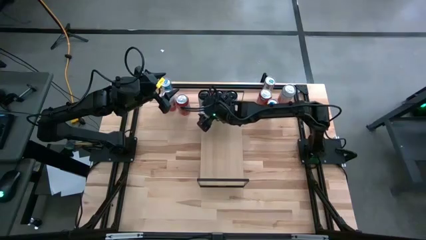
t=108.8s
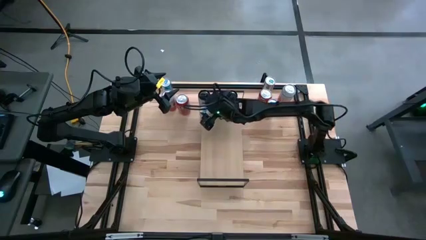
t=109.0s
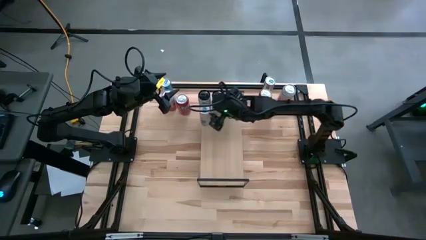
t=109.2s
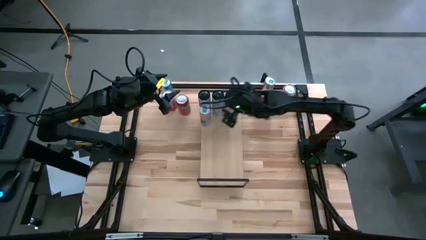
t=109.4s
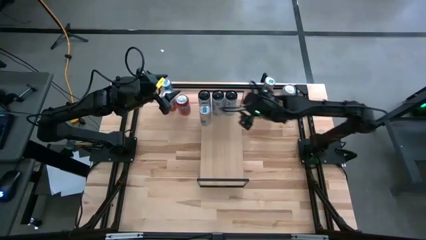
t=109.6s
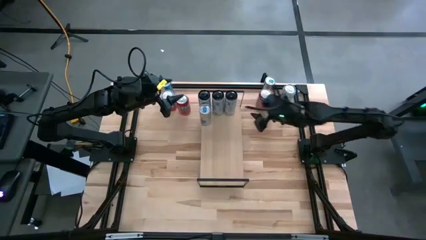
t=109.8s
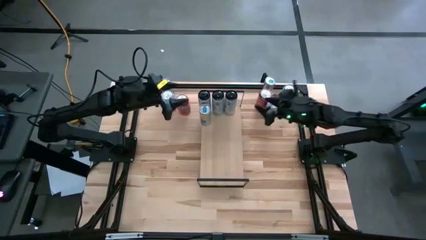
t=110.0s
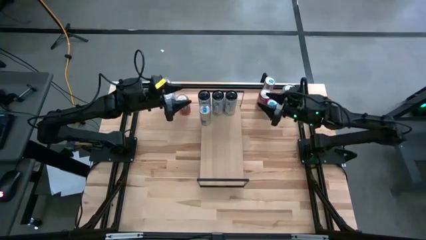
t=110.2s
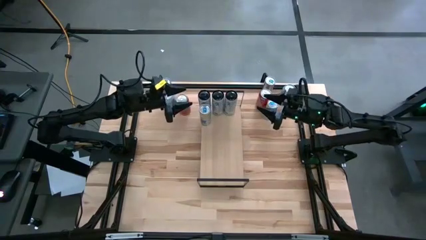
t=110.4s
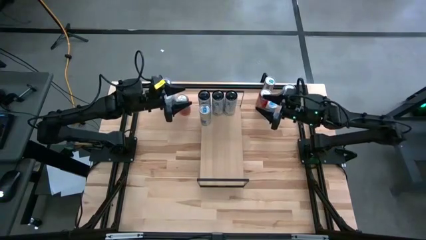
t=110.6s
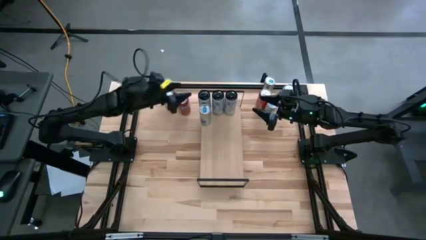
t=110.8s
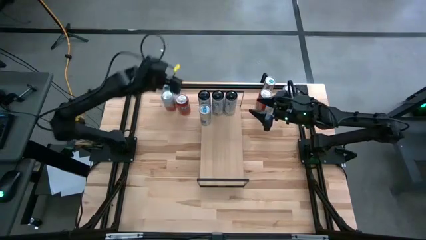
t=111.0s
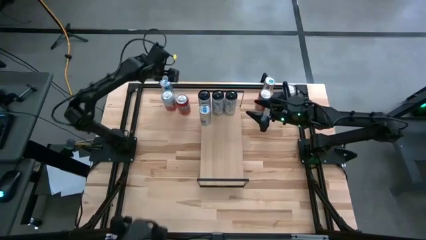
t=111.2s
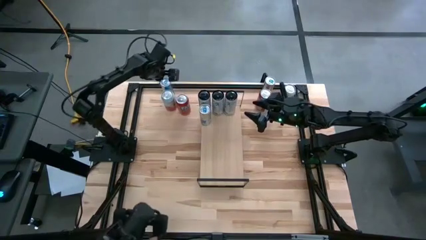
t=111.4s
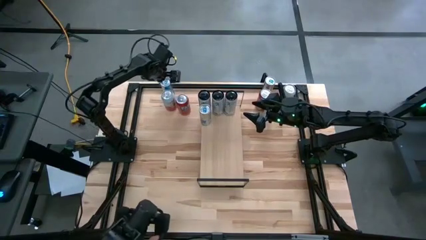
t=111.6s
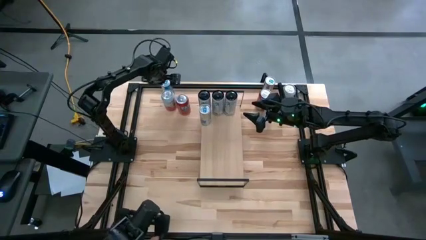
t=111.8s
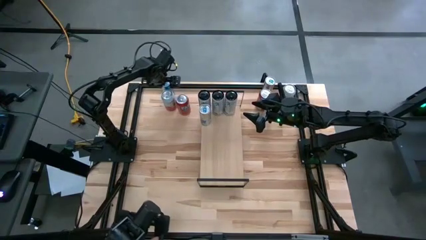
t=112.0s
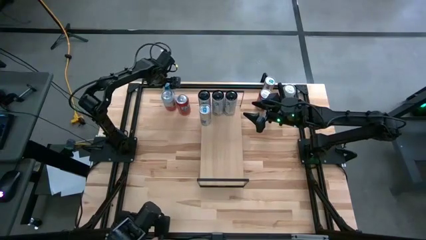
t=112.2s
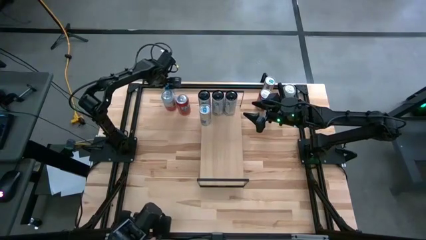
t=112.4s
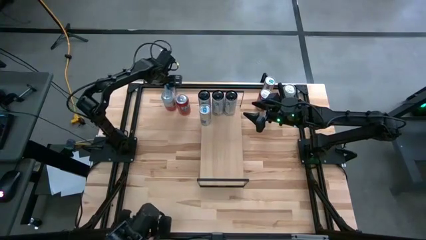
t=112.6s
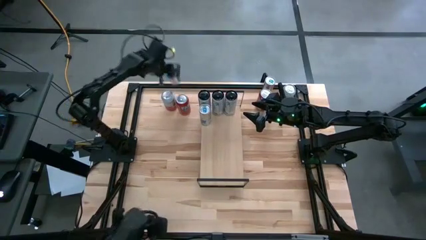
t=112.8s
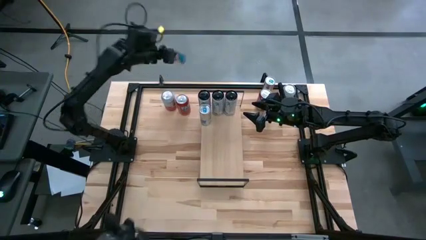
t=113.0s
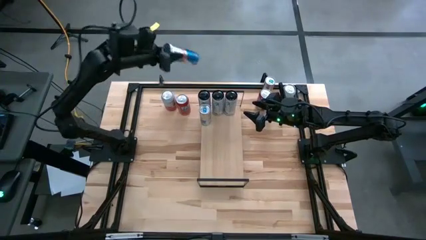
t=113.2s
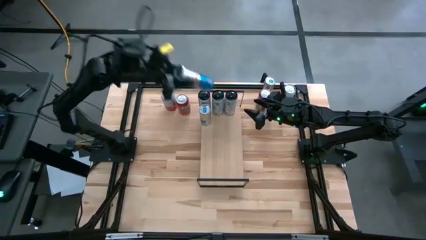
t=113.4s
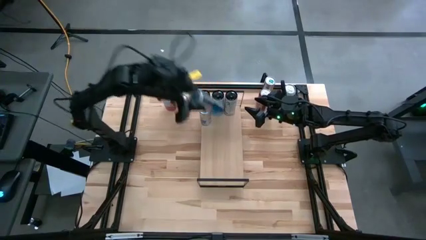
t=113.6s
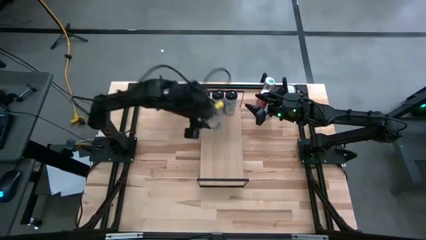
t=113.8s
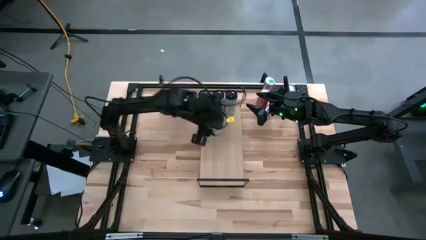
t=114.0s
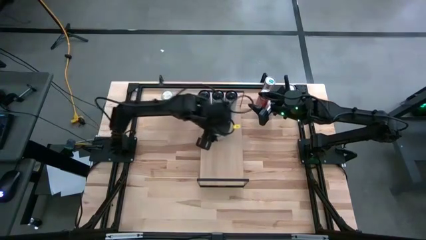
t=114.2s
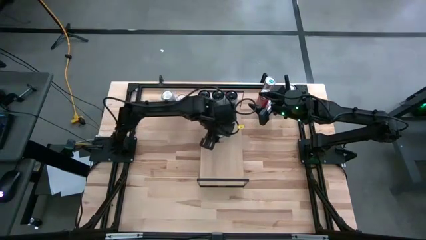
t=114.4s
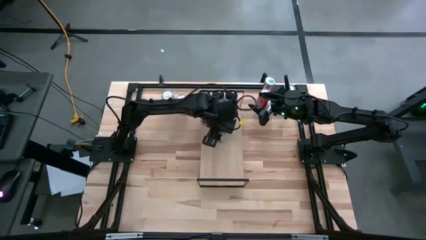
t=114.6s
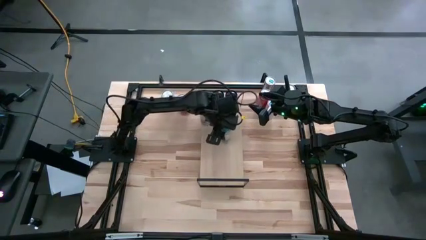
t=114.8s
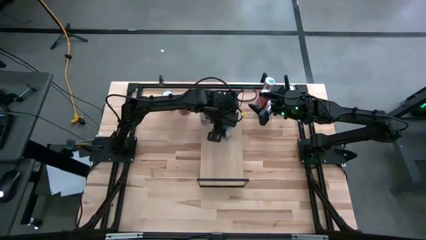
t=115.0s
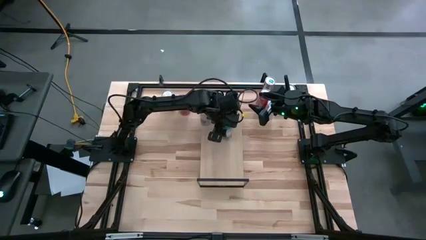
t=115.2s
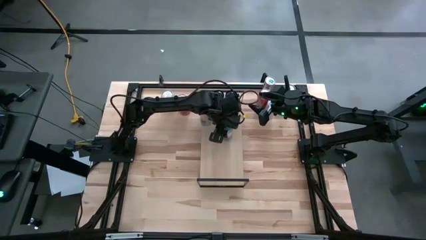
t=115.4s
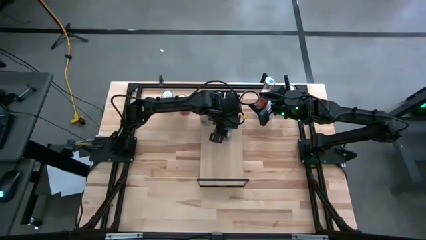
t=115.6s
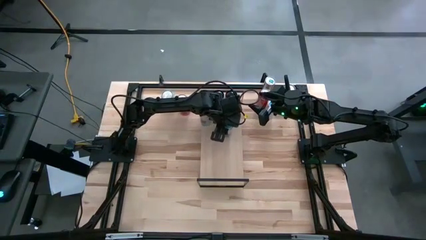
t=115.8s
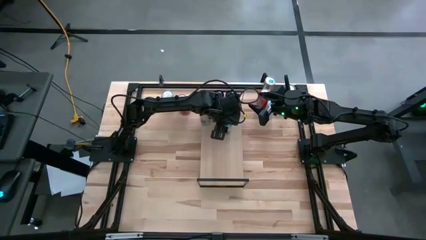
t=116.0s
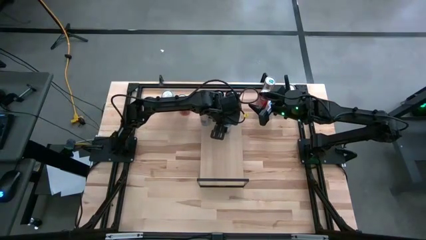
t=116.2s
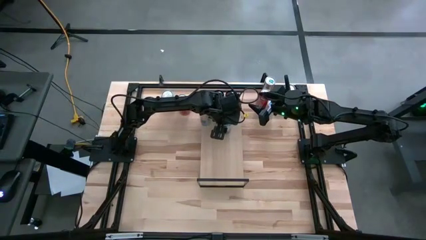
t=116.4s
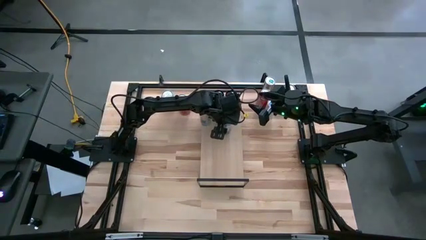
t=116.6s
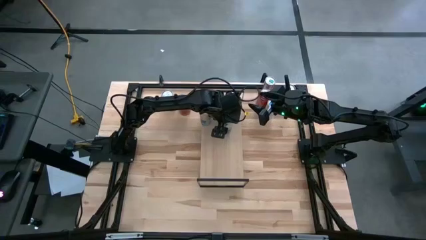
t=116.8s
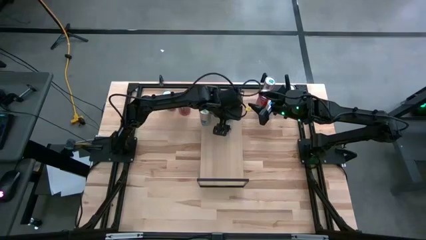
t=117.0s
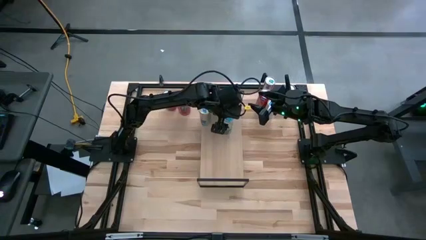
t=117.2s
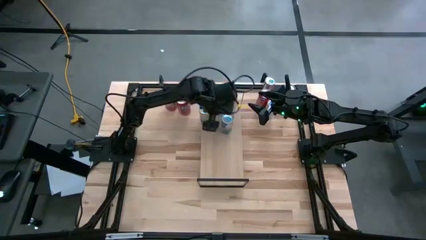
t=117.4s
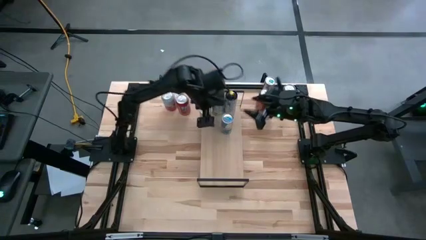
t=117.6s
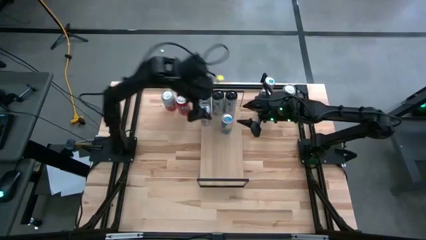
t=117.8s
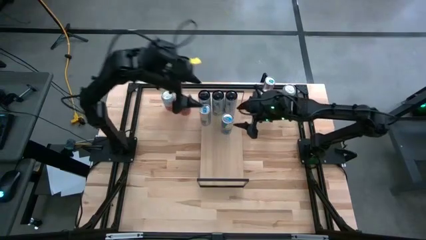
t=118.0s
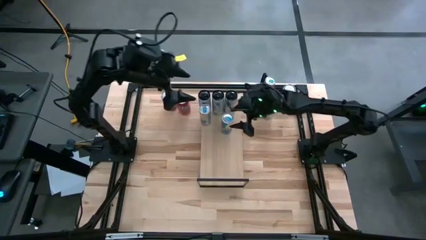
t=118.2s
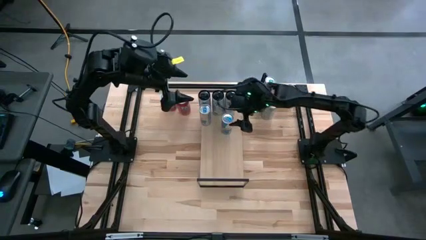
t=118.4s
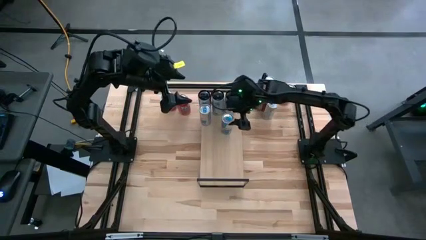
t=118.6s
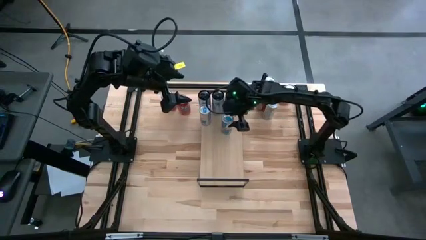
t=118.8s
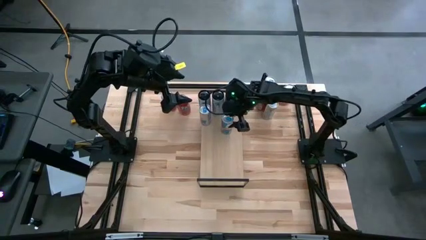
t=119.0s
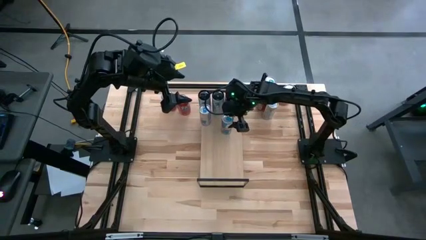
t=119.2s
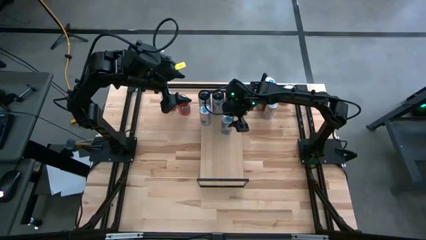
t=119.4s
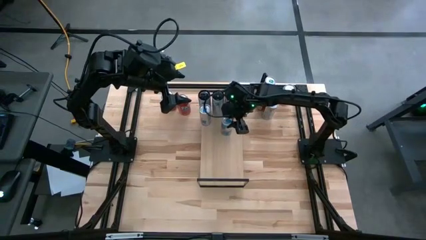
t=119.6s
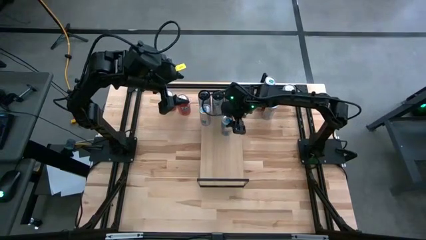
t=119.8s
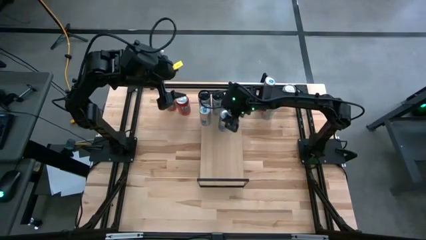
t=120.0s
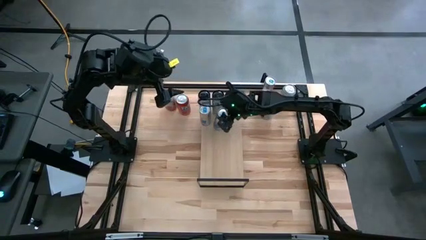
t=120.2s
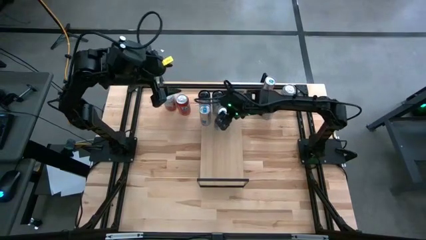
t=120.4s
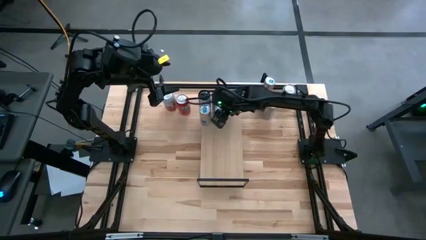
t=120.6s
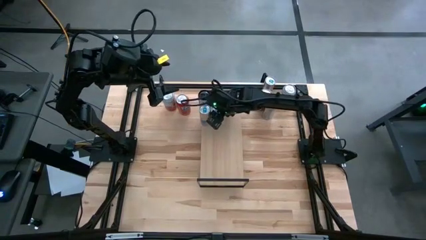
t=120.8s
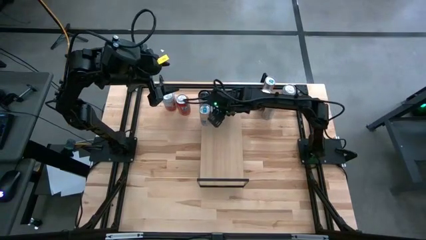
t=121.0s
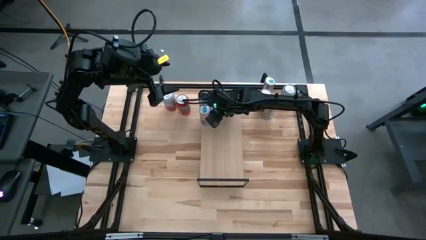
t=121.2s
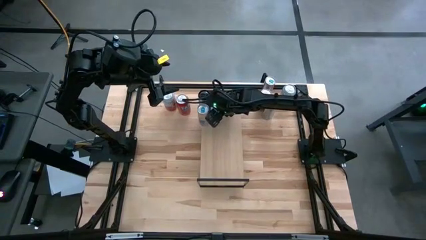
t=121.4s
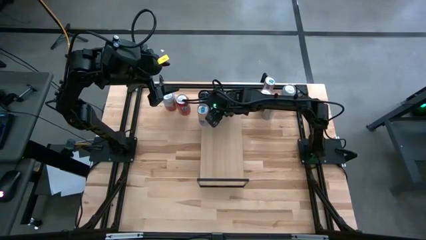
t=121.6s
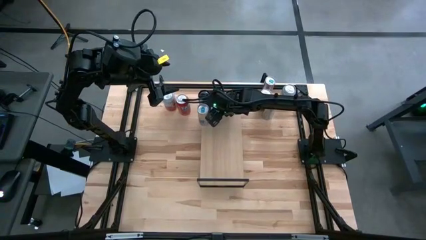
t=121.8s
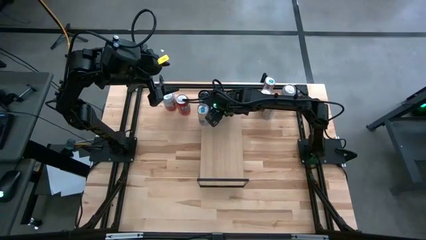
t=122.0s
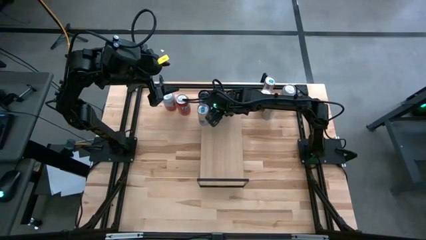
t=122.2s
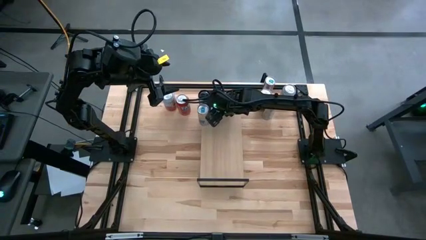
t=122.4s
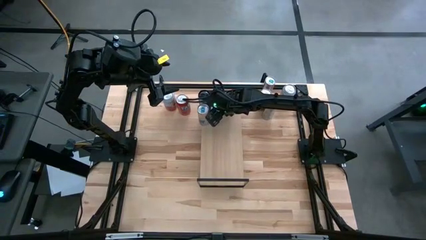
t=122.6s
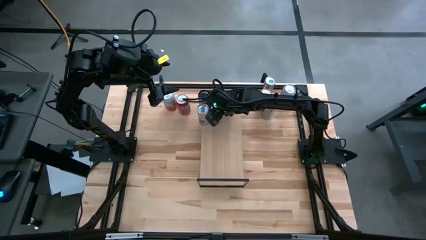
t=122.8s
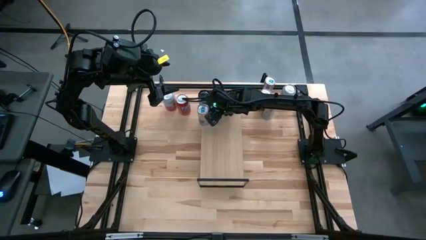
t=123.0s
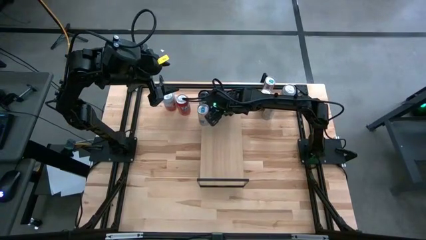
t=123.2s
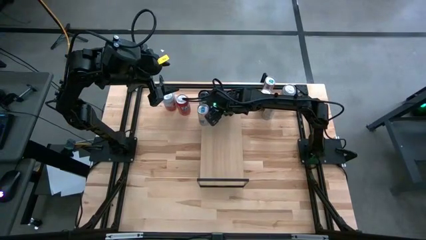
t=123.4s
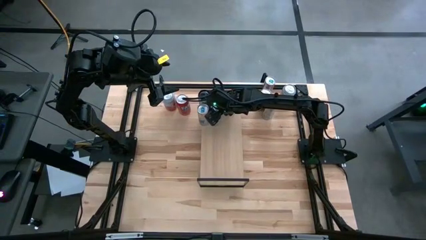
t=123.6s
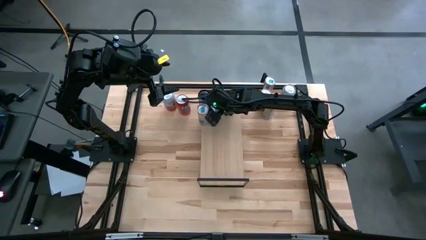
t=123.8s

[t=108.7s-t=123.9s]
Task: Place canned beverage on shelf
Put the top left blue soda can on the shelf aligned with the other blue soda can

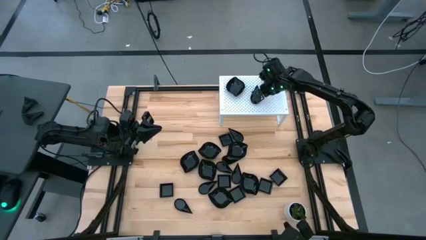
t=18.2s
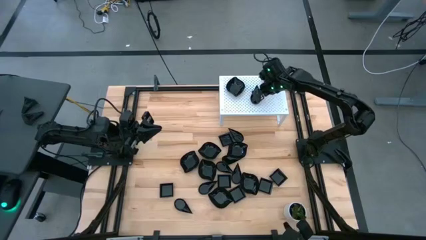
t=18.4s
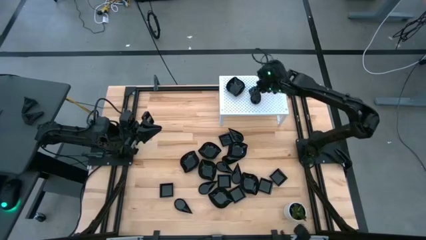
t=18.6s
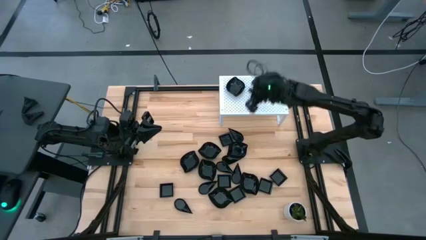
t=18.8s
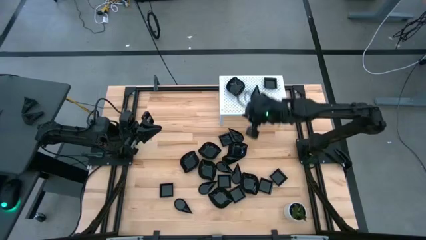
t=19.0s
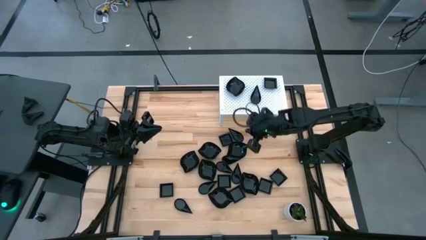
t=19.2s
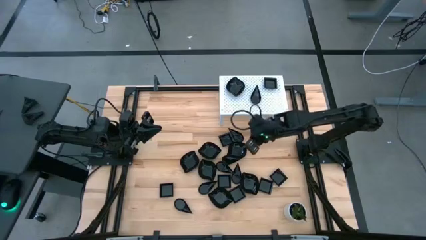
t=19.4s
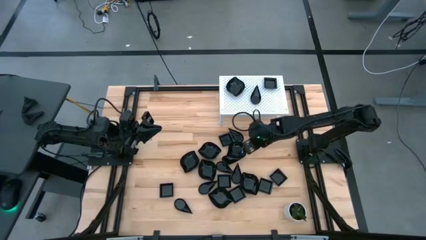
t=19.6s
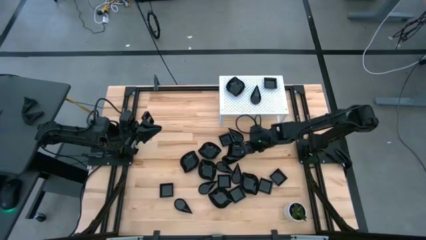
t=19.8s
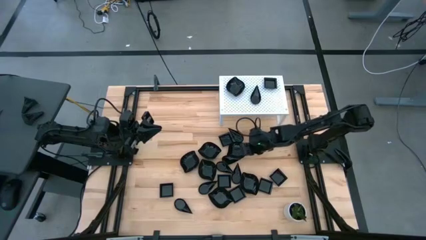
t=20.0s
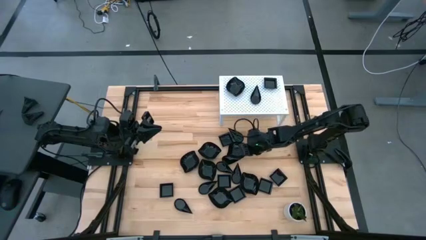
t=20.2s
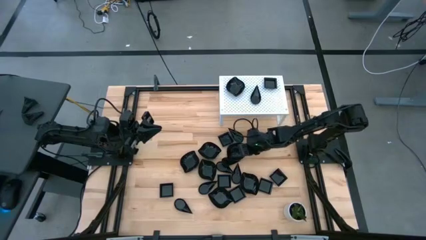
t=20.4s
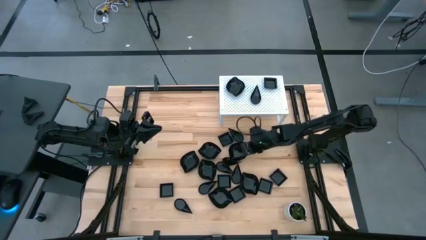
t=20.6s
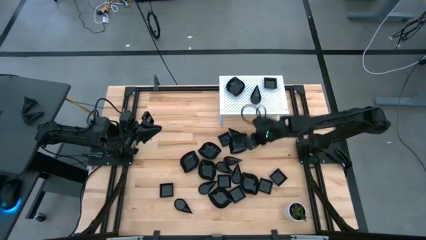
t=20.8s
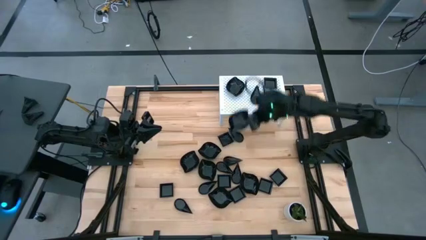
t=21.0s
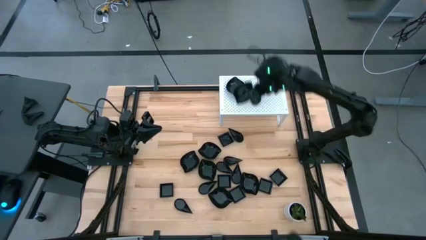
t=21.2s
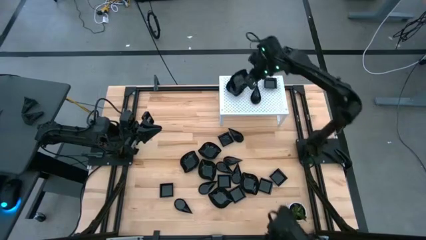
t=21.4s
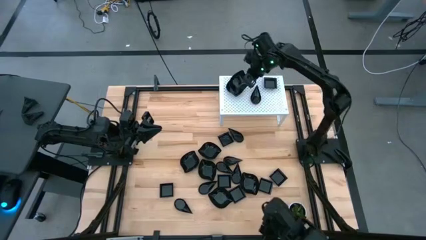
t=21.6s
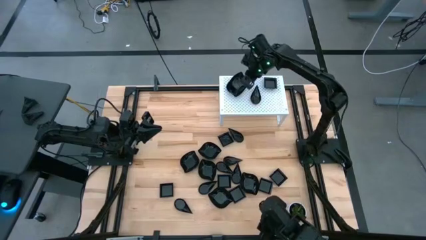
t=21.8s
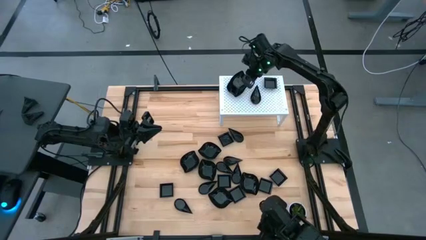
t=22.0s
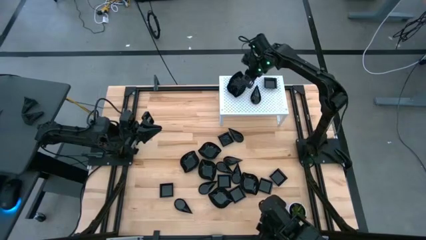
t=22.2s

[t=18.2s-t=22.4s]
Task: Pick & Place Mini shaped plates
Stack the leaf shaped plate on top of the leaf shaped plate on the shelf
